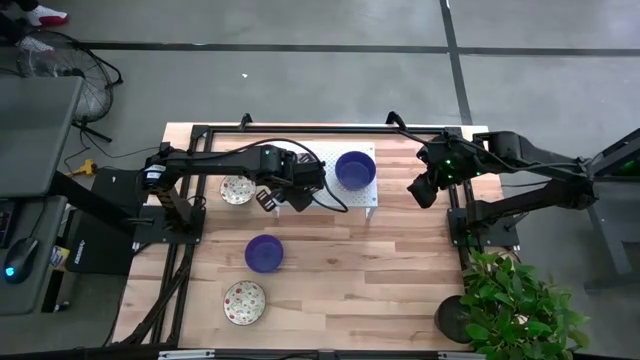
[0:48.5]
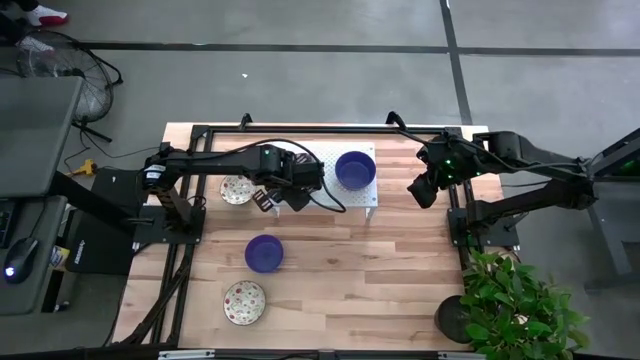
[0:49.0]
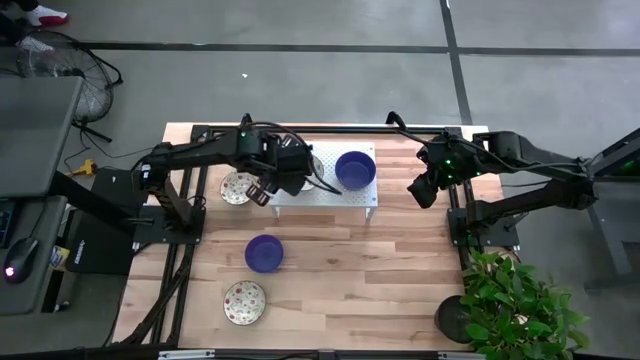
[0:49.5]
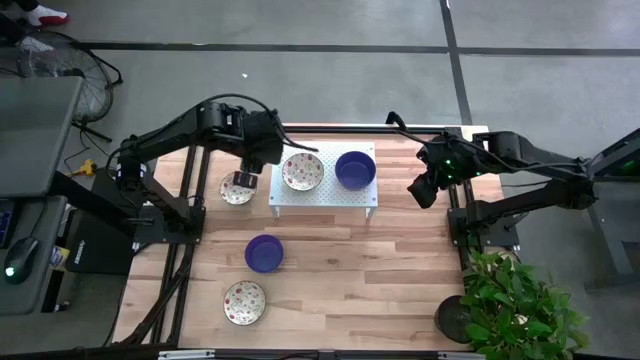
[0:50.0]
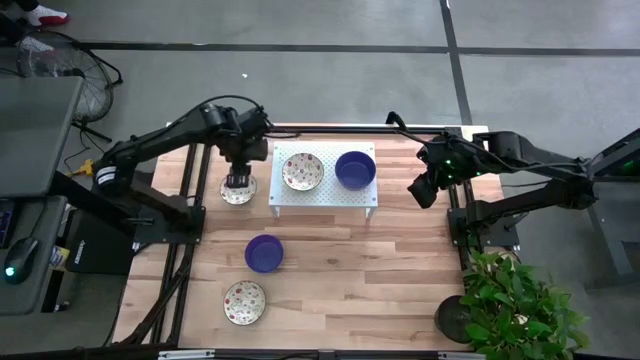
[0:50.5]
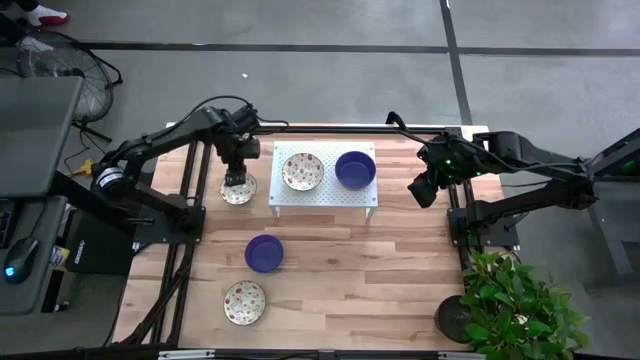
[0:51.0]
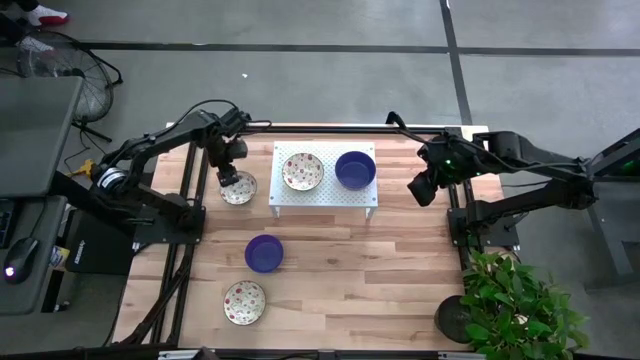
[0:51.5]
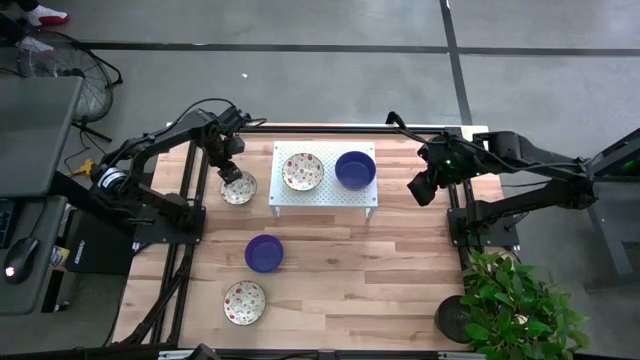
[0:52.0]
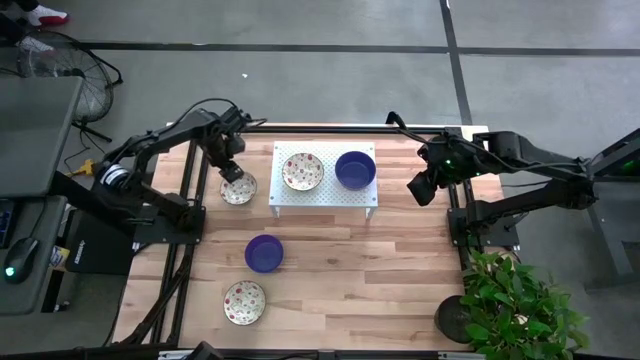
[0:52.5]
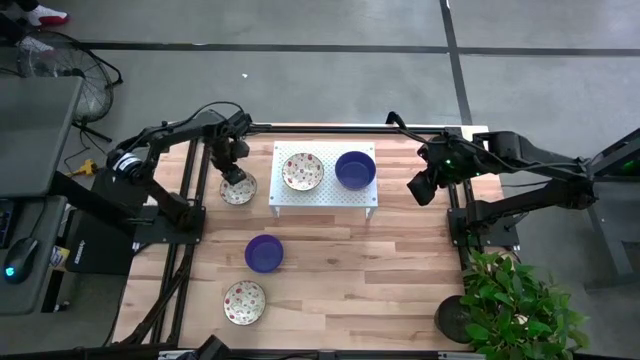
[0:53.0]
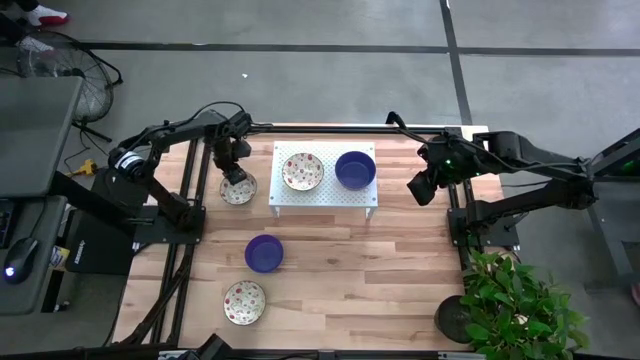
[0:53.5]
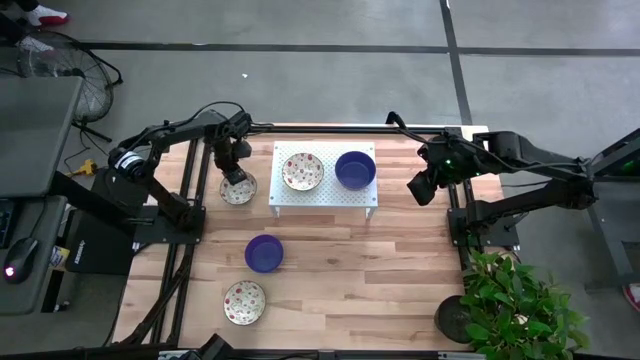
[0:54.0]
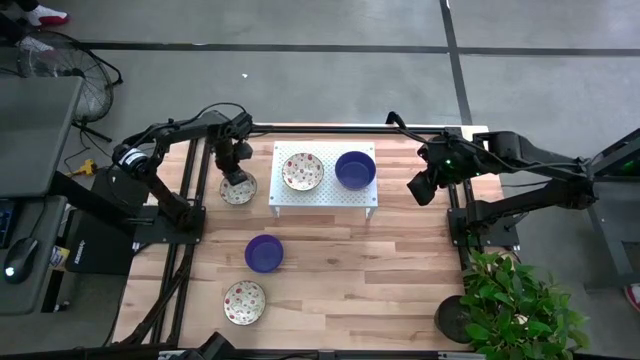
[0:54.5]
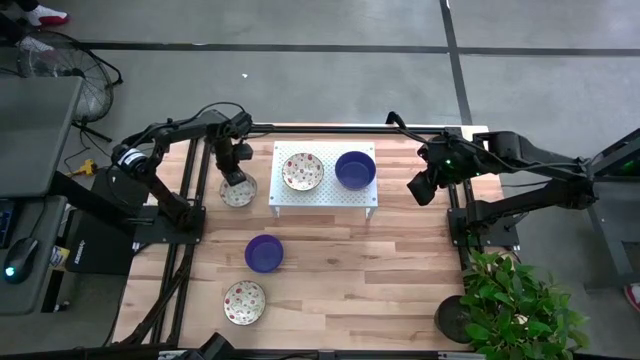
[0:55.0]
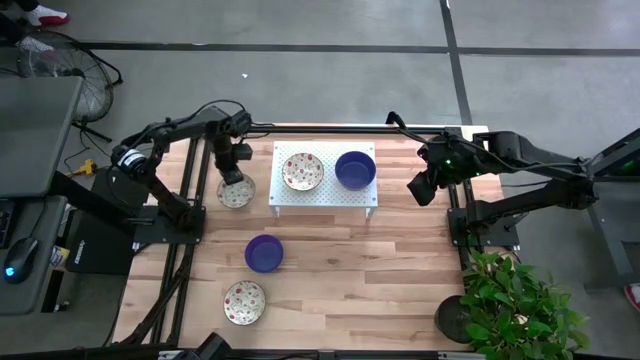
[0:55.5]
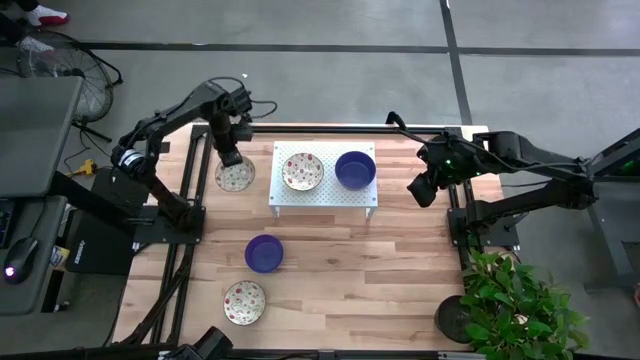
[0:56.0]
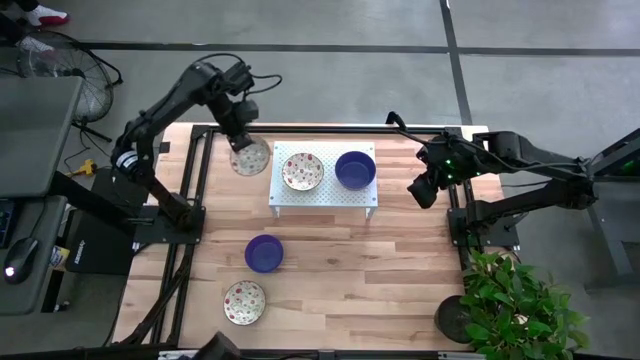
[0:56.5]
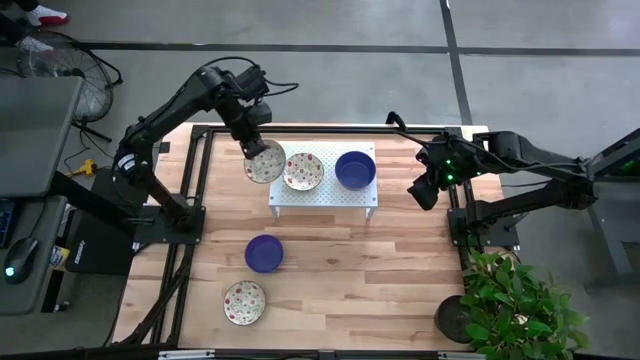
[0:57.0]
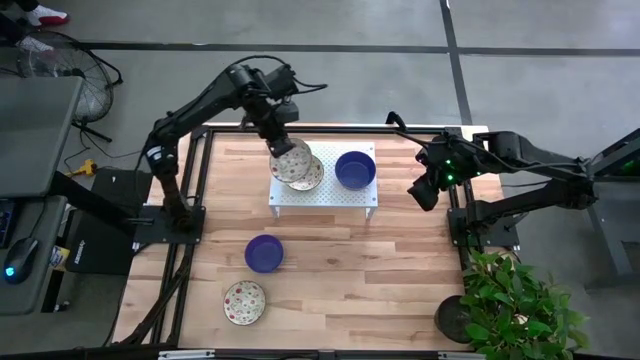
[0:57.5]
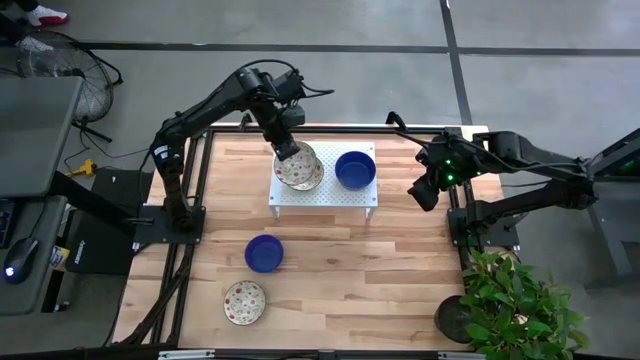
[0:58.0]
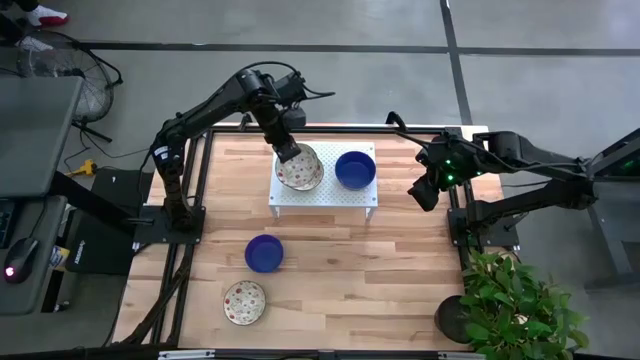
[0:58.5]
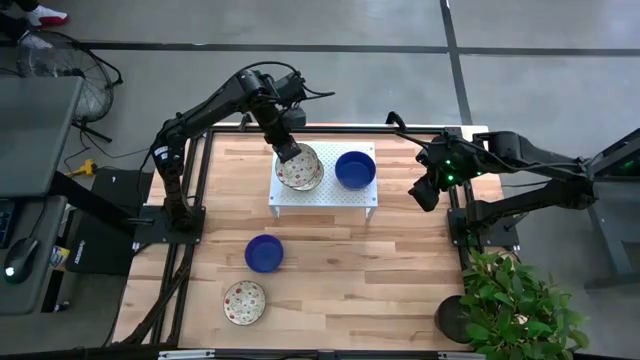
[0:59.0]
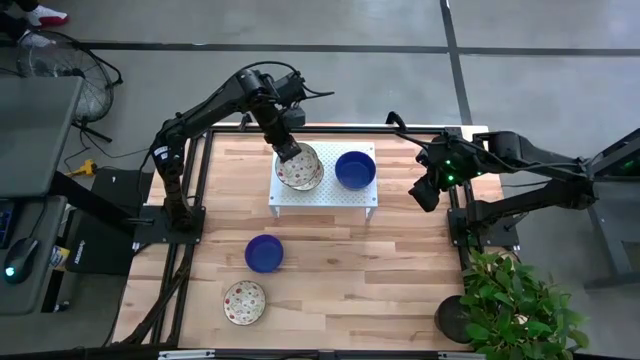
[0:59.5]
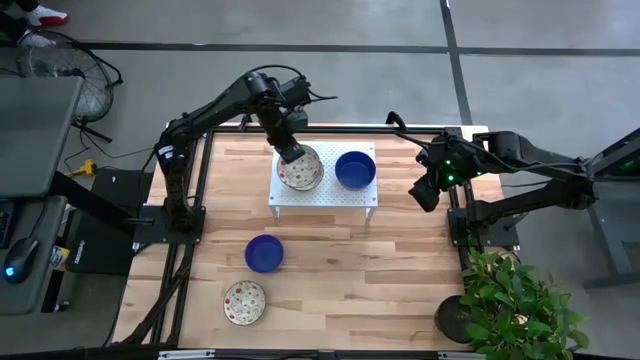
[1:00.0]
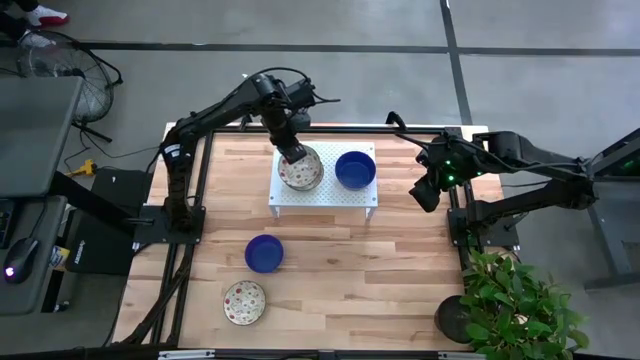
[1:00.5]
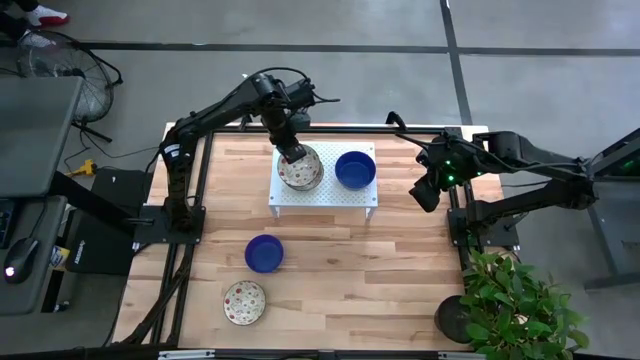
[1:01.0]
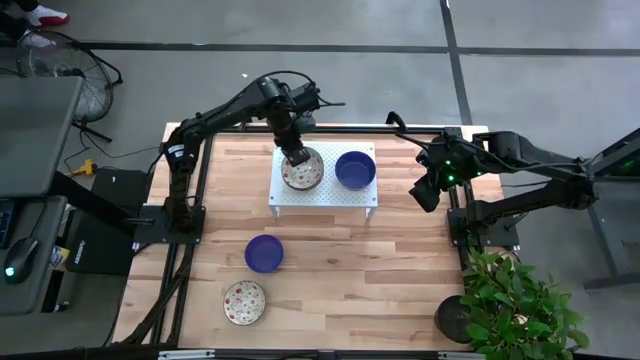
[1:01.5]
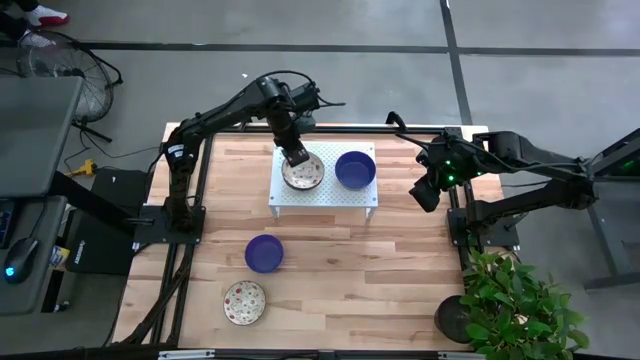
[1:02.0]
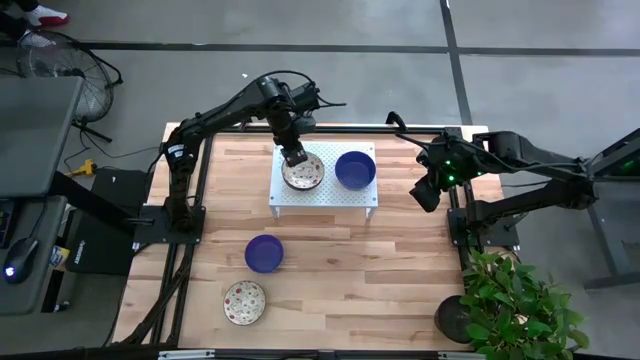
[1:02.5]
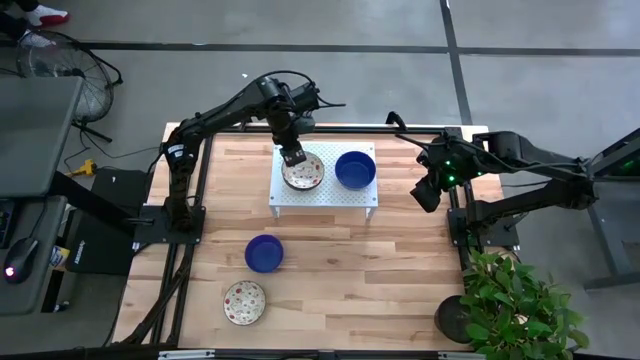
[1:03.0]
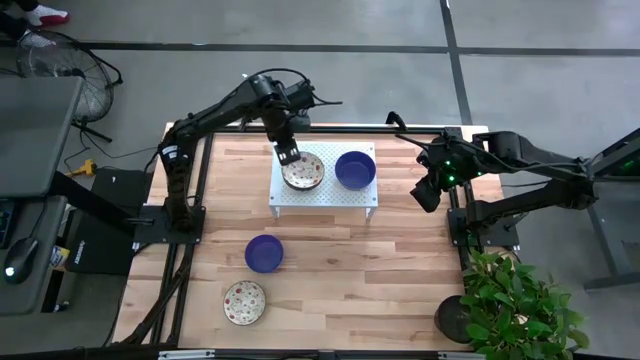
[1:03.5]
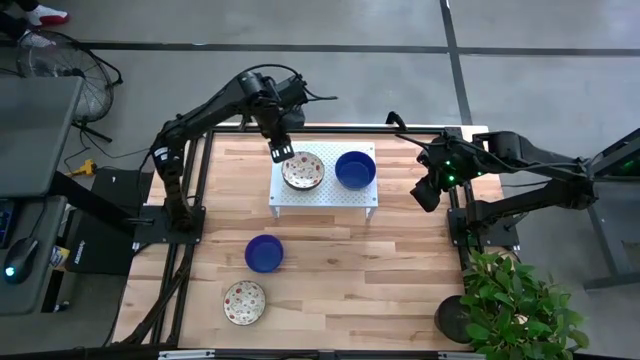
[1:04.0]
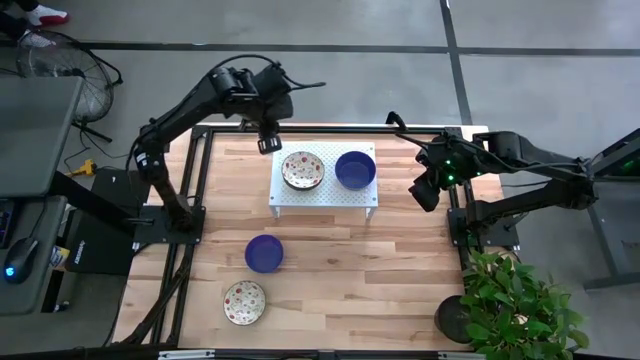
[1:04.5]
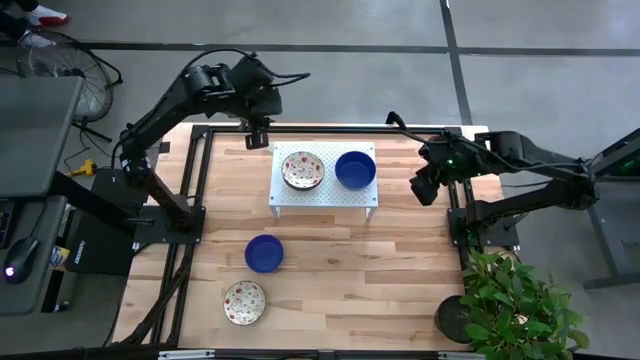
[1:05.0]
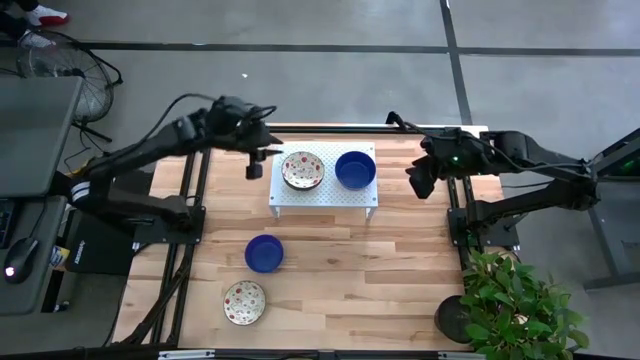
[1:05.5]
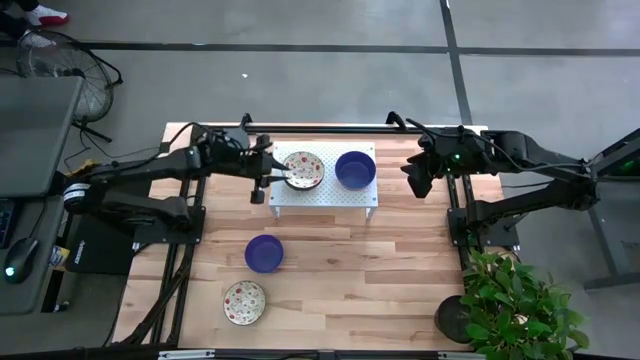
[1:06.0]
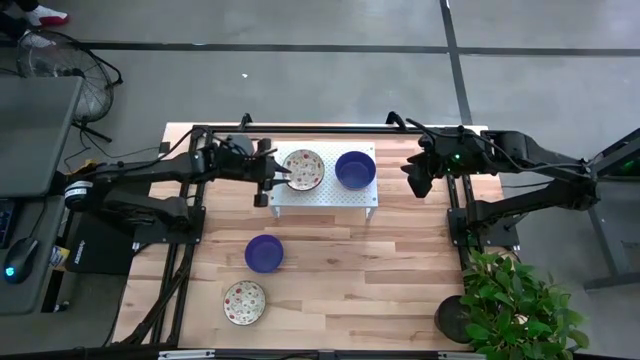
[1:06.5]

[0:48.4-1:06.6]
Task: Pick & Place Mini bowls
Stack the top white patterned bowl on top of the white patterned bowl on the shelf
